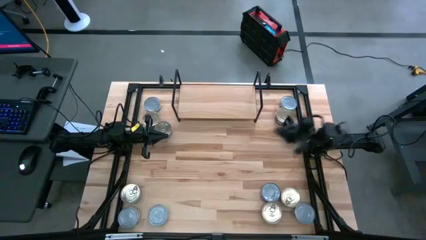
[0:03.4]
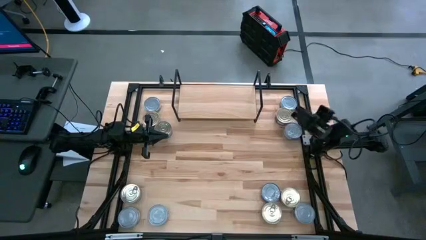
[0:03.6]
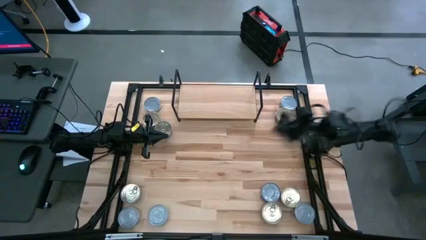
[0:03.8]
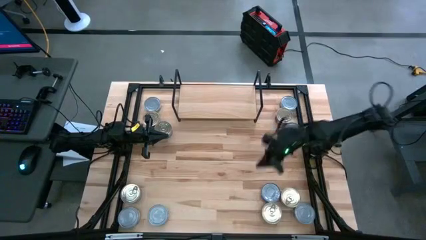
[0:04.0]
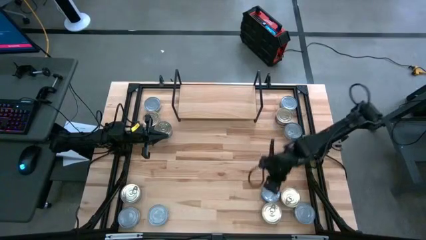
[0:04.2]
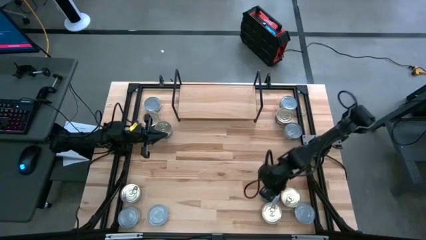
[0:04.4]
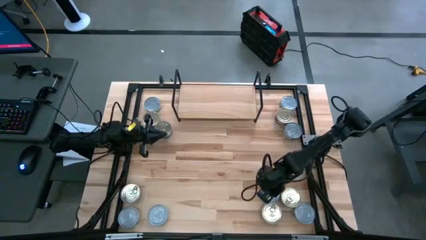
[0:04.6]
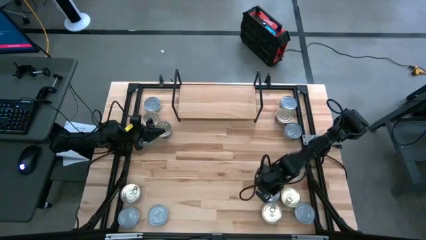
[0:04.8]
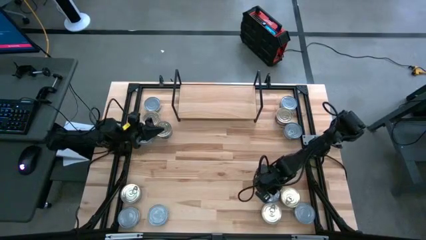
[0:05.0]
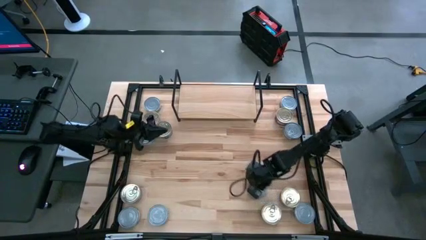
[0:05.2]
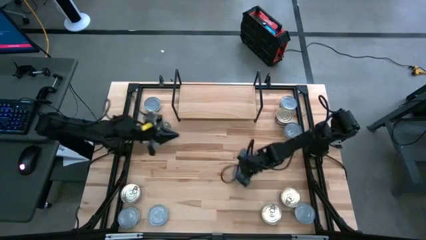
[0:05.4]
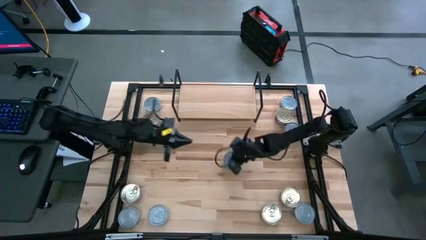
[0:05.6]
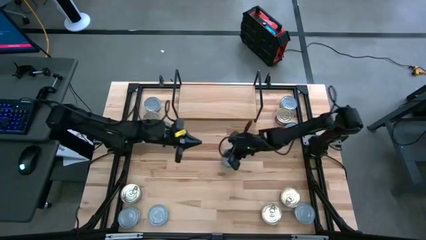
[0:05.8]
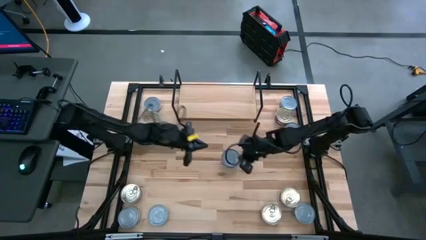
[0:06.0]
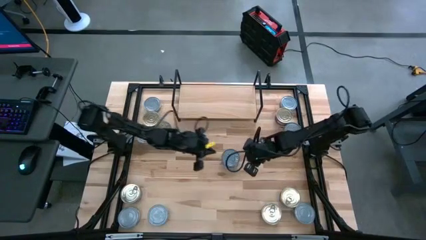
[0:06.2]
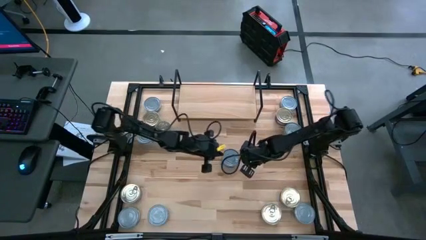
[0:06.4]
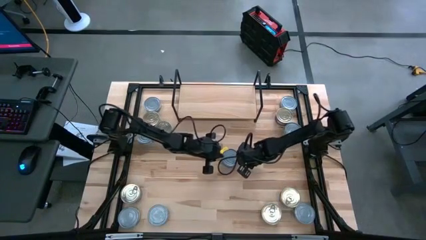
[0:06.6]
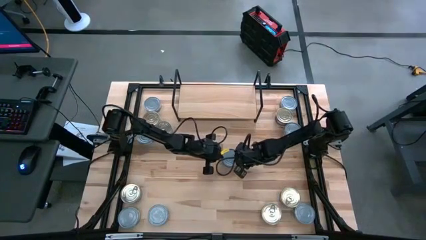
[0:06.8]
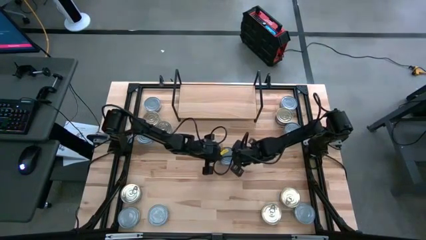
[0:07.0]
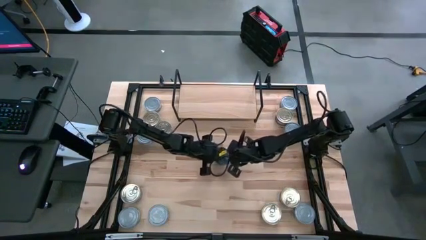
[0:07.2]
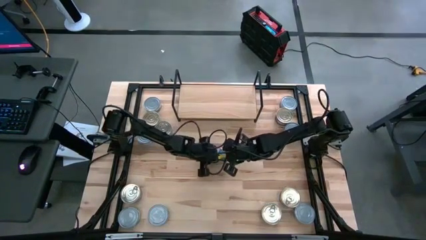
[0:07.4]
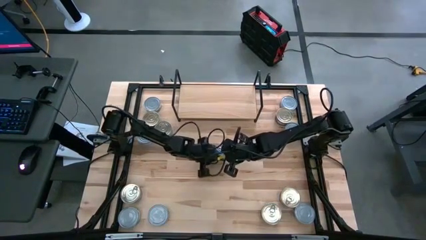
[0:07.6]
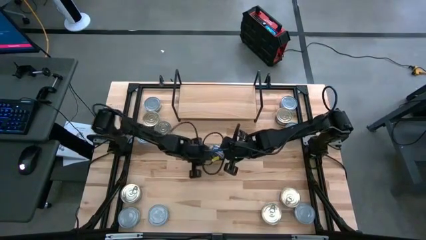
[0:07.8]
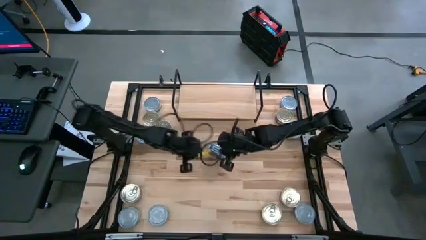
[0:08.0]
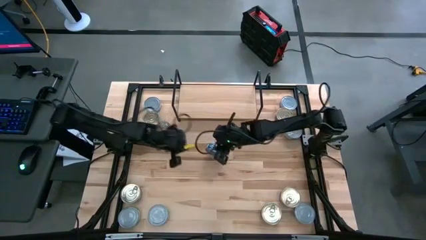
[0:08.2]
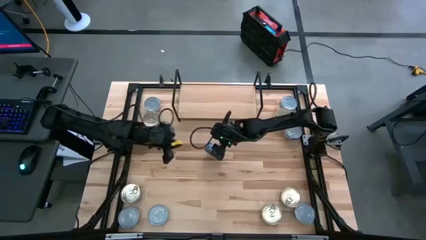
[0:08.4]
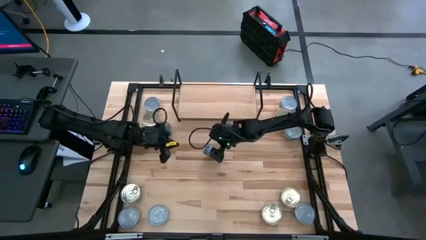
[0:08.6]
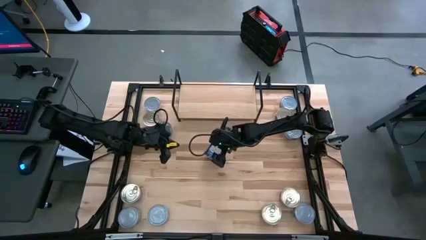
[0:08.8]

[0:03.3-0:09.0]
Task: Stack canned seafood by type on shelf
Put the blue tuna can on the shelf

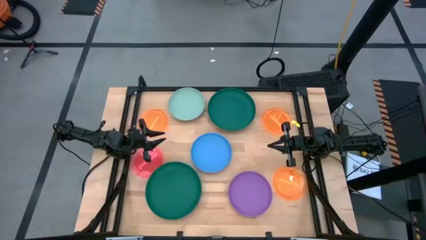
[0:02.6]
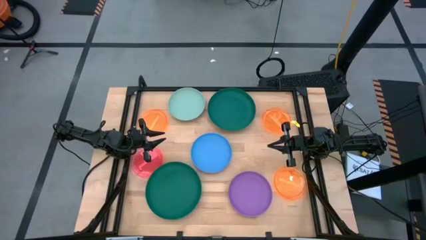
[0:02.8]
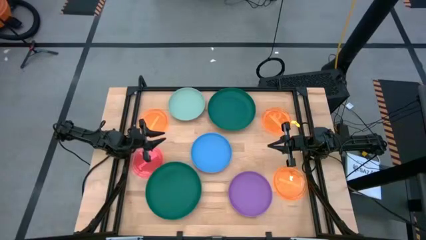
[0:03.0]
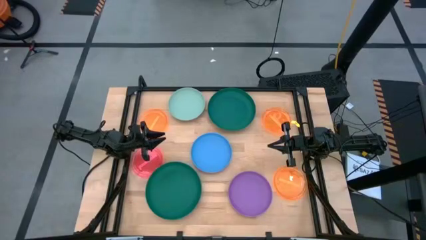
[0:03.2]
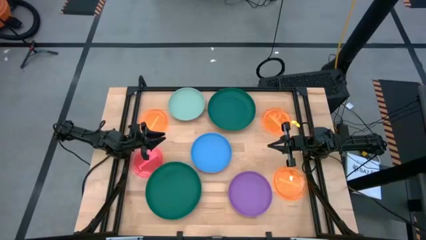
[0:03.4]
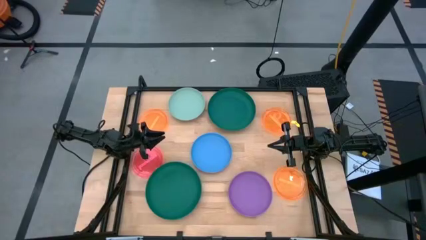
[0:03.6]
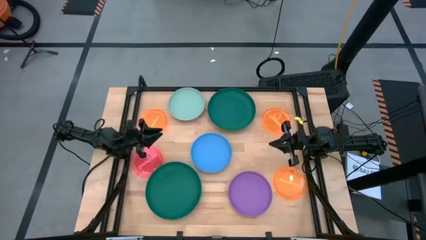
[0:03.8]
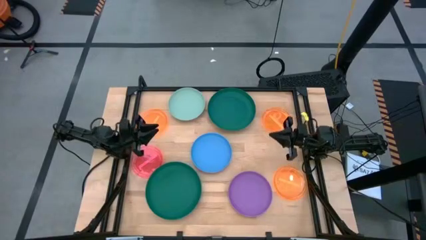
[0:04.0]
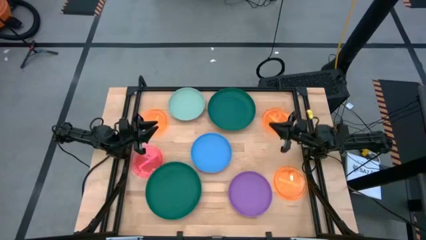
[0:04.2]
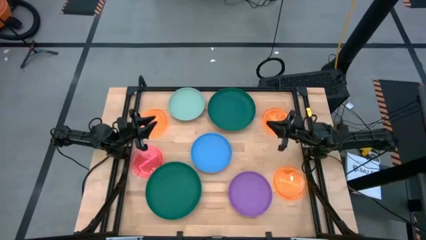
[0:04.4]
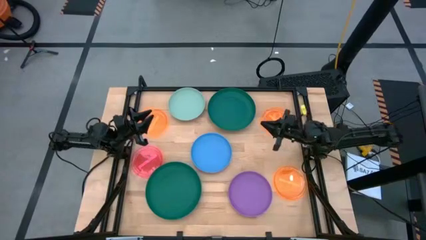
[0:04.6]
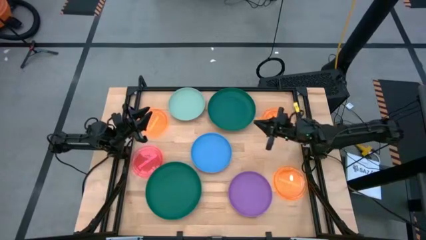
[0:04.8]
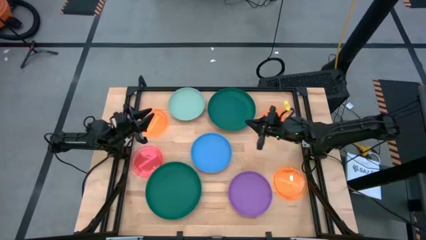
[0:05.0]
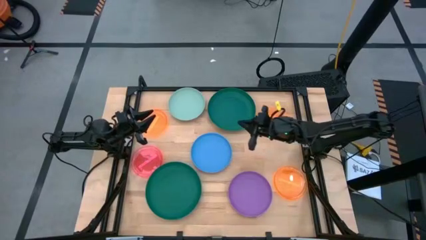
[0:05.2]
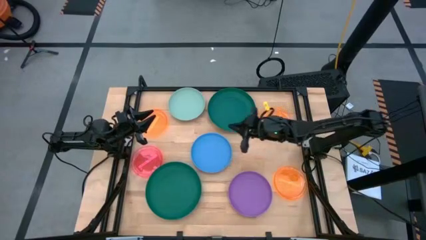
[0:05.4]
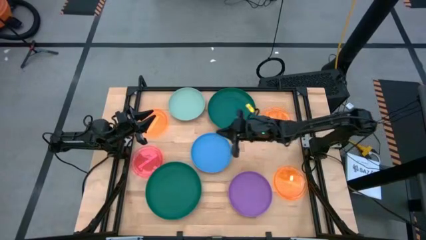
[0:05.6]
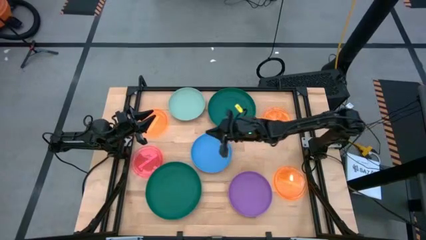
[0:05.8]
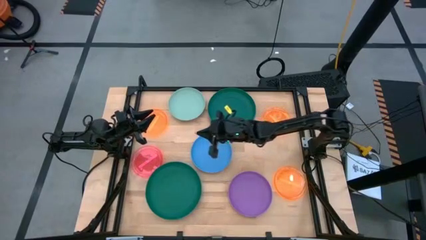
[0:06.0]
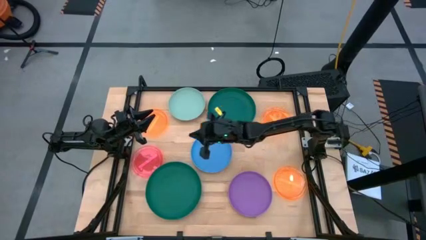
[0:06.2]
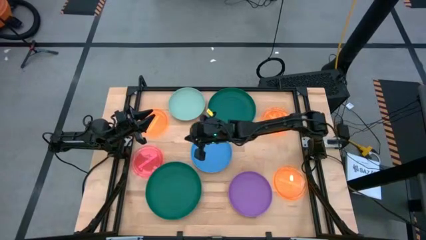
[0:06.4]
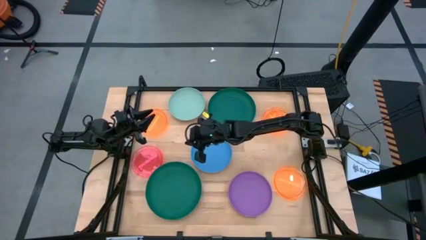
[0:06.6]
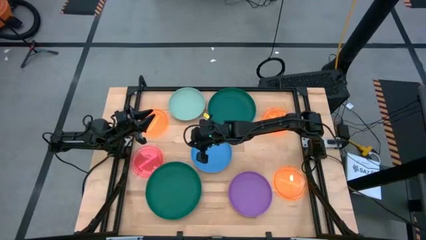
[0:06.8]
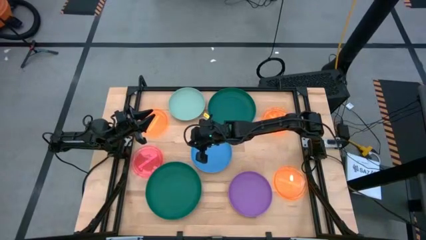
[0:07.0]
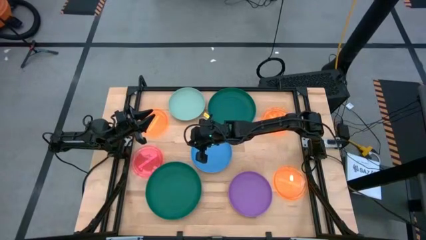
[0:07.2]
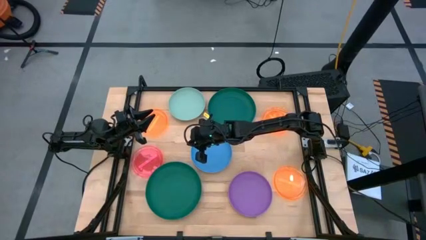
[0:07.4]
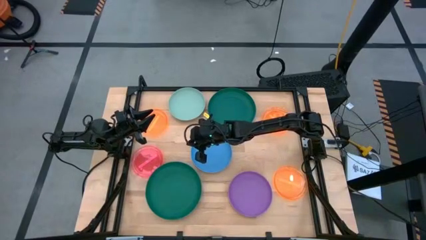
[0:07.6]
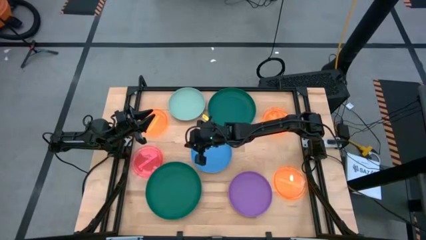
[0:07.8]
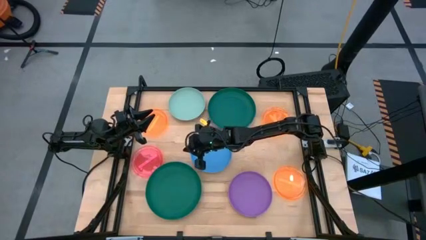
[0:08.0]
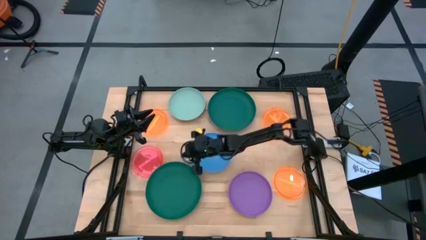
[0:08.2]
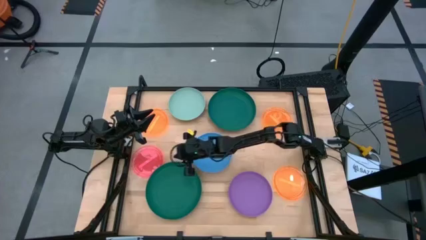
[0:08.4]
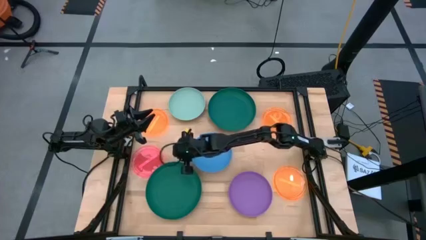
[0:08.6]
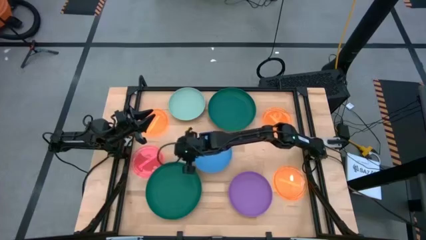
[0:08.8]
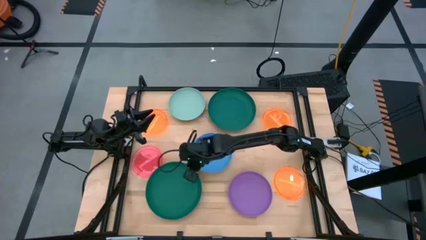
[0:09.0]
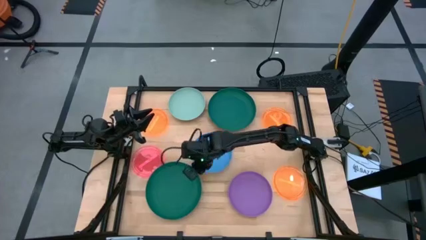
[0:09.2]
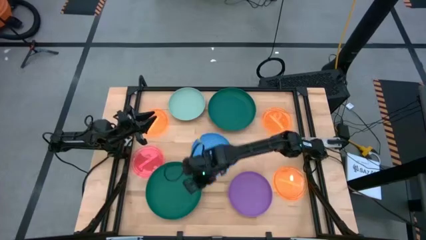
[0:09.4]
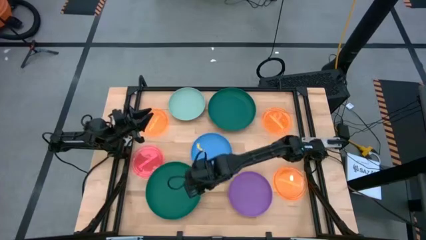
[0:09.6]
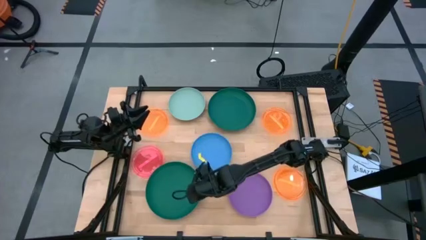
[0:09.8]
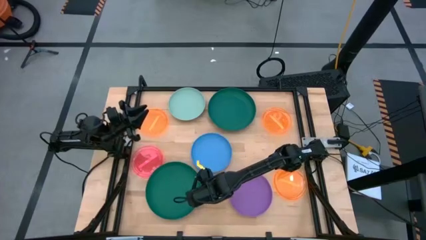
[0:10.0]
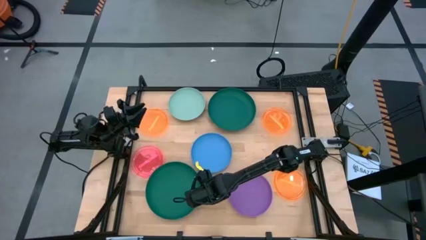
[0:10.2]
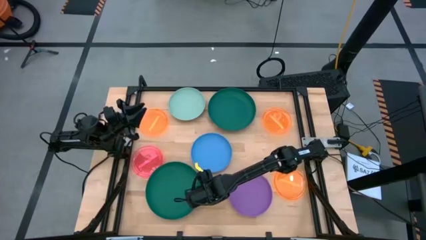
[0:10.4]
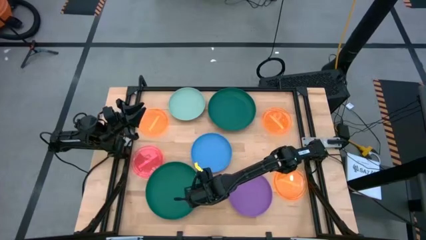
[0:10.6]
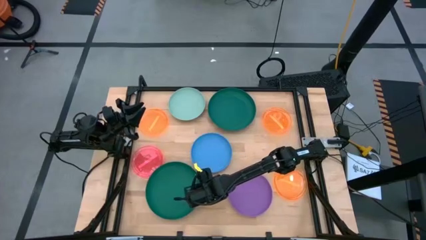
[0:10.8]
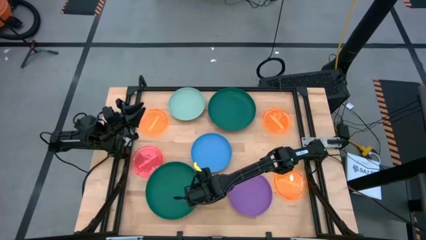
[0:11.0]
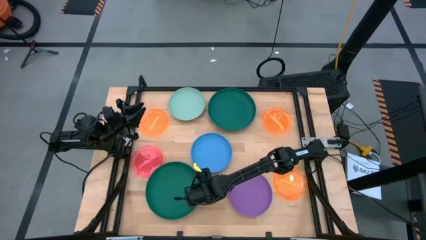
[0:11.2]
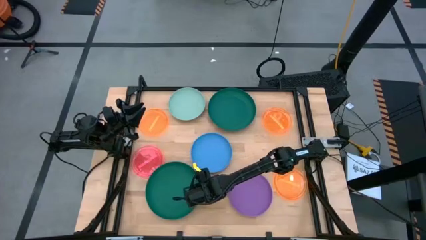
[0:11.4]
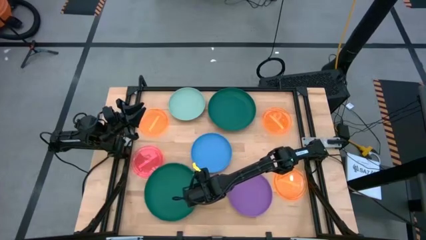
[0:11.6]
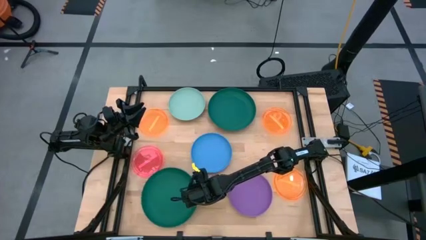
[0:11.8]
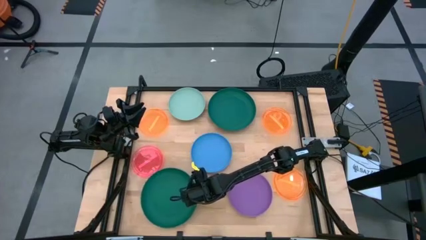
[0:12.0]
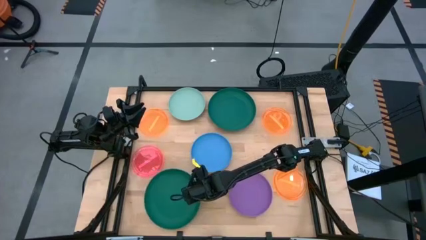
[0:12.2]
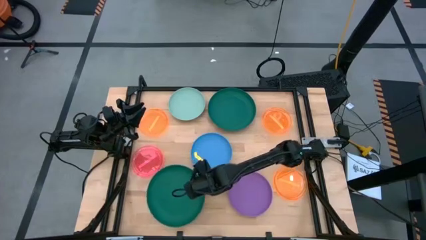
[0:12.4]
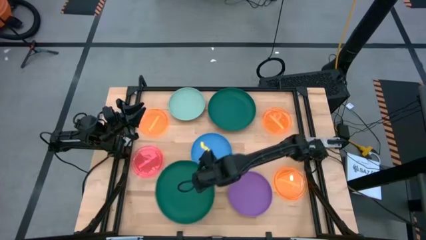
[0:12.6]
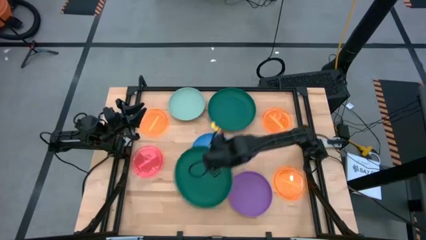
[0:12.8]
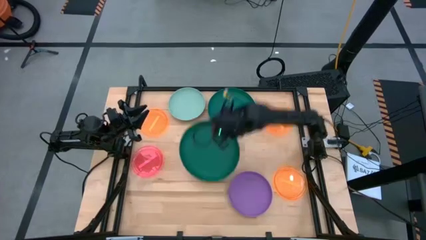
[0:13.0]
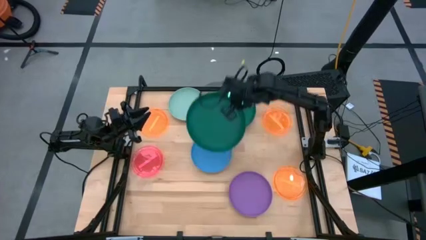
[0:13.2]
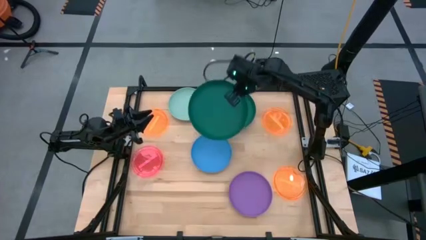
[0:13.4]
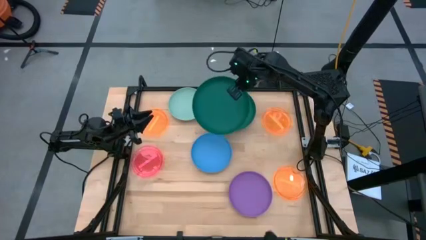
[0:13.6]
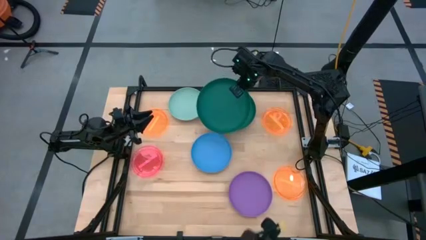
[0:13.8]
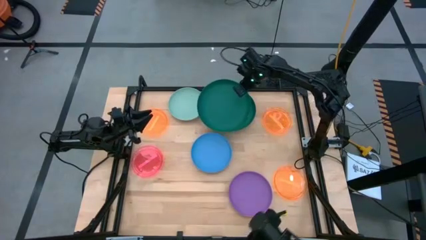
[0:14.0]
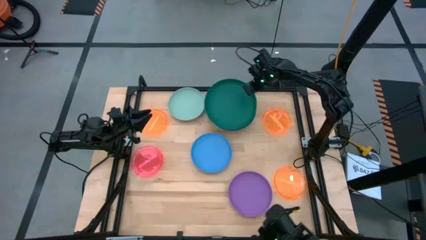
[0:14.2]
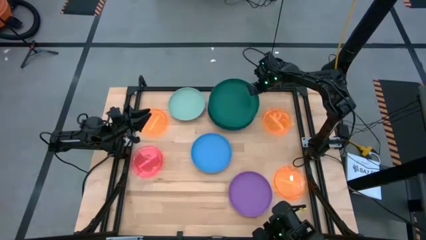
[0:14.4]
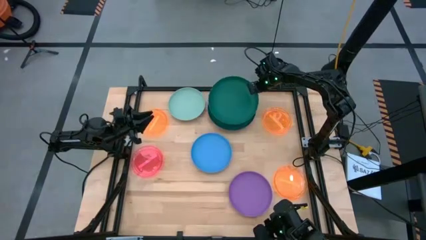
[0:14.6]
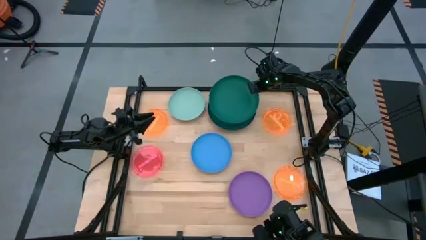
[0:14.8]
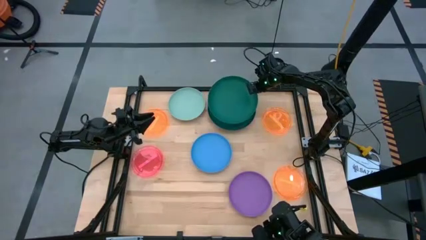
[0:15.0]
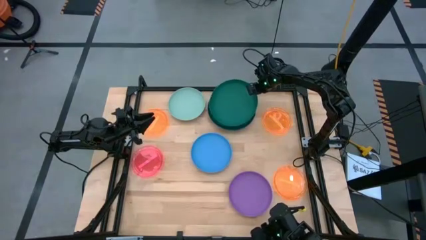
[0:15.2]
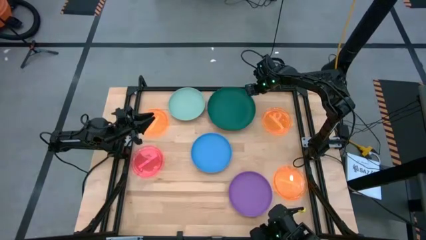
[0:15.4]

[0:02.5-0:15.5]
Task: Stack plastic plates
Stack the bottom green plate on the top green plate
